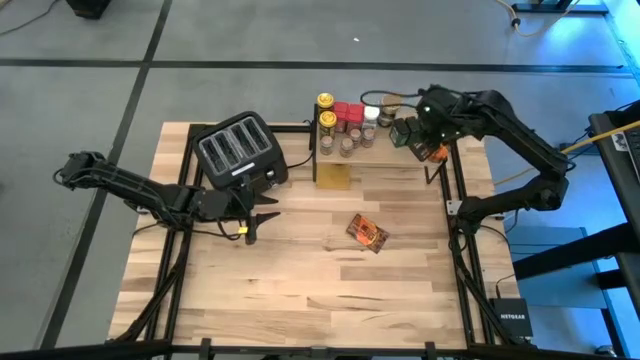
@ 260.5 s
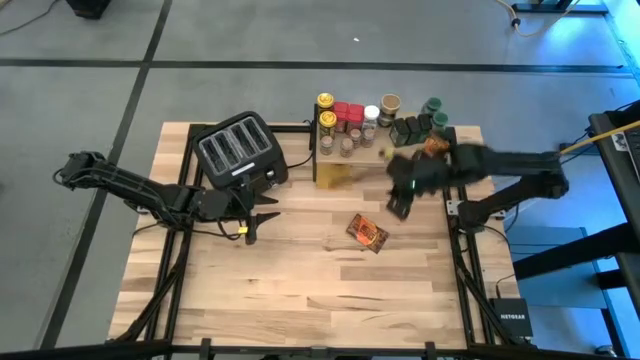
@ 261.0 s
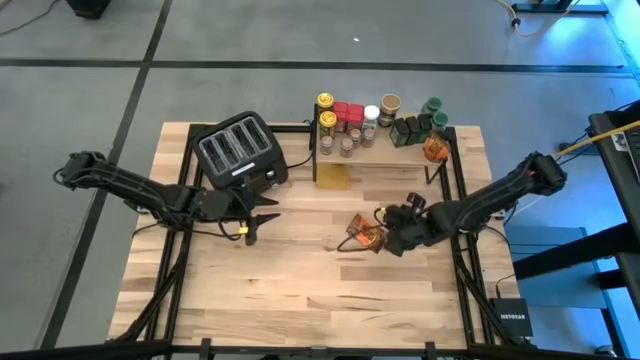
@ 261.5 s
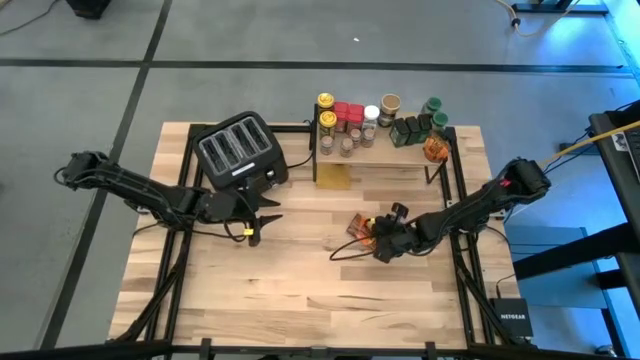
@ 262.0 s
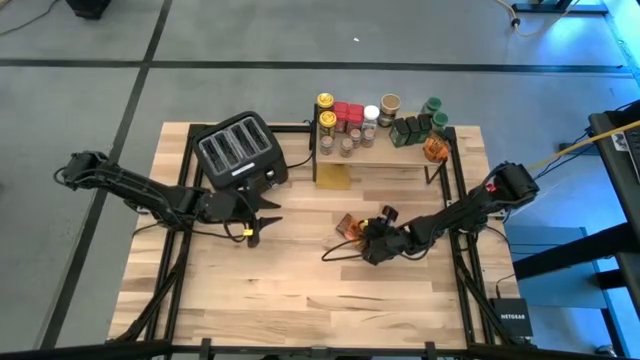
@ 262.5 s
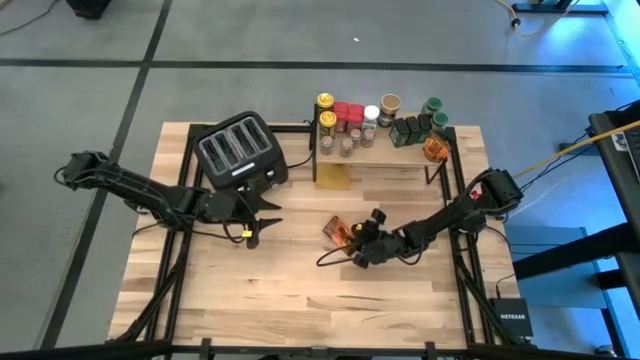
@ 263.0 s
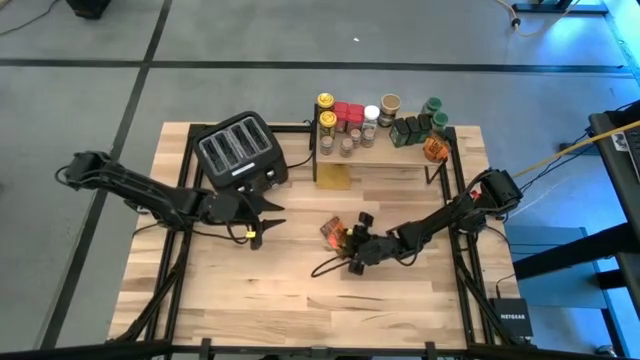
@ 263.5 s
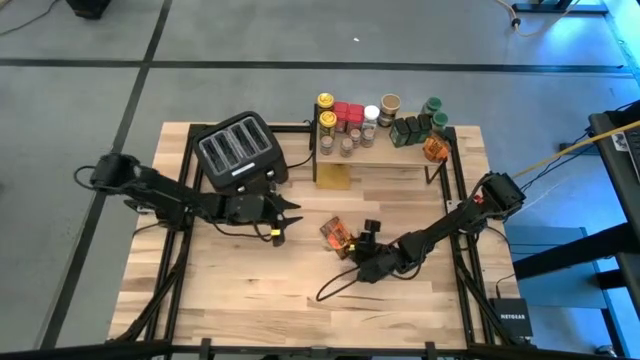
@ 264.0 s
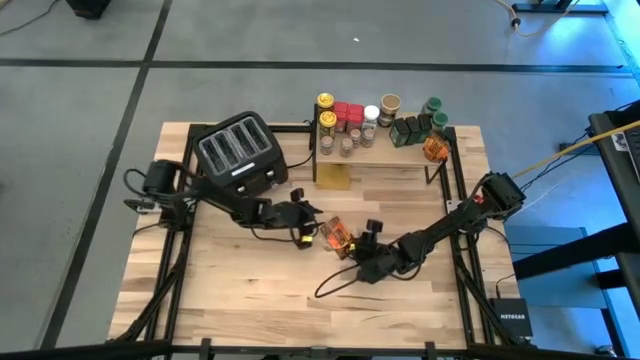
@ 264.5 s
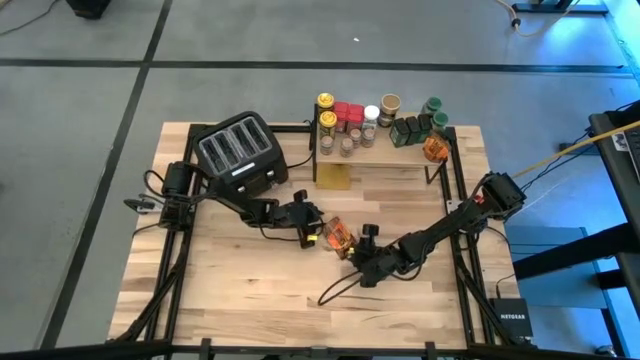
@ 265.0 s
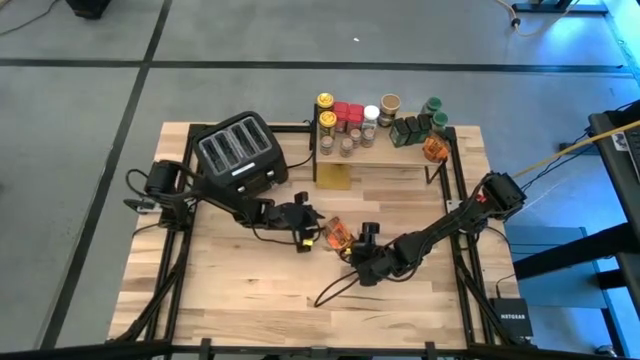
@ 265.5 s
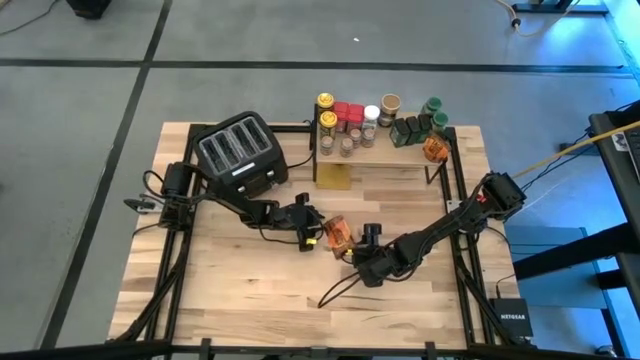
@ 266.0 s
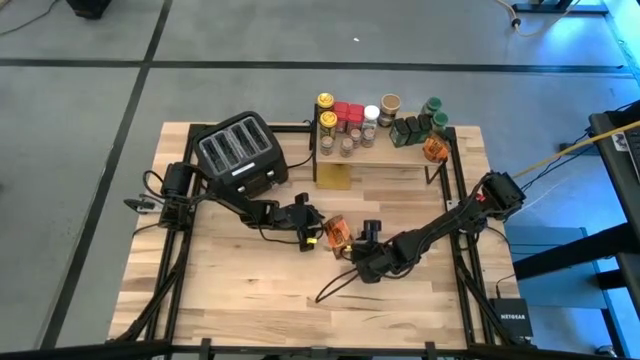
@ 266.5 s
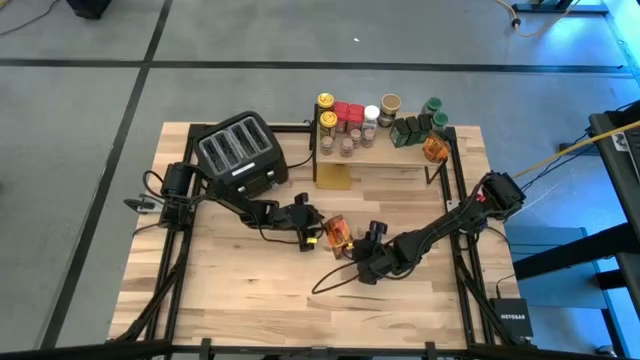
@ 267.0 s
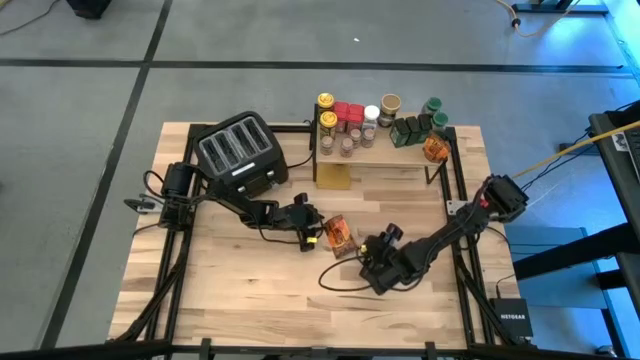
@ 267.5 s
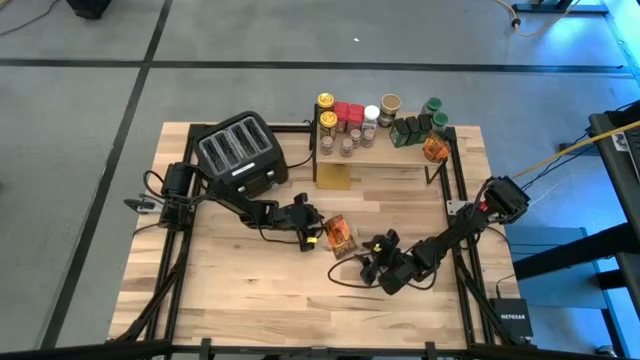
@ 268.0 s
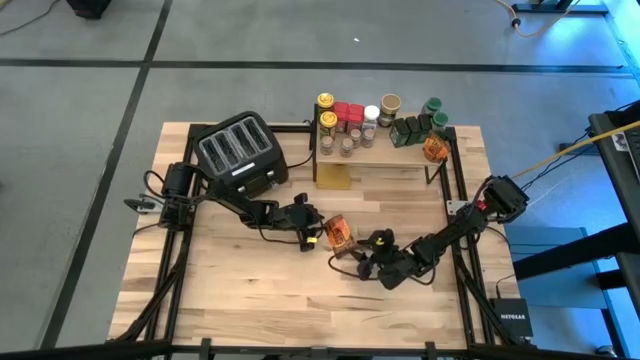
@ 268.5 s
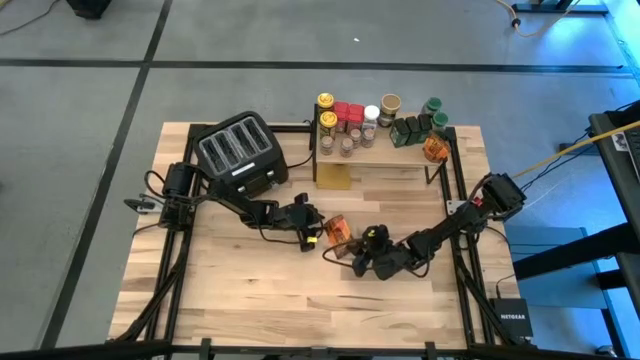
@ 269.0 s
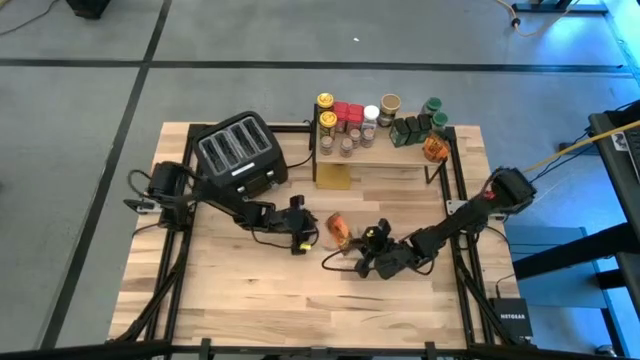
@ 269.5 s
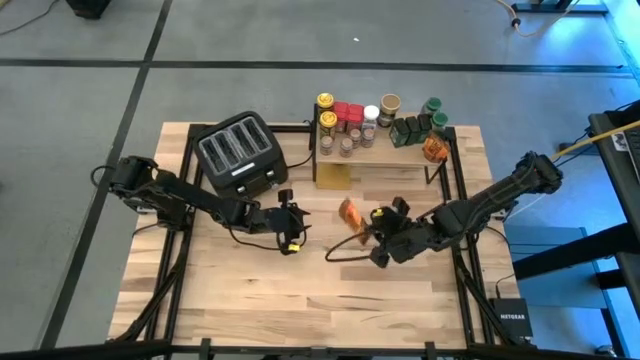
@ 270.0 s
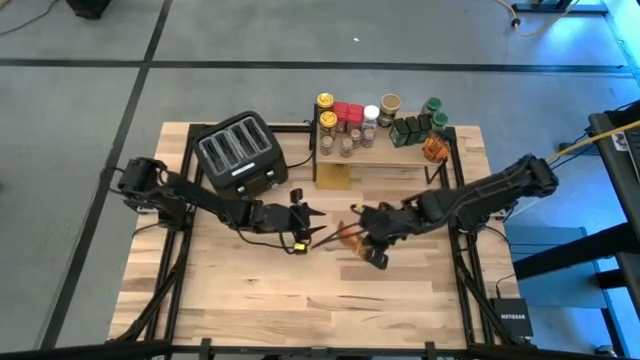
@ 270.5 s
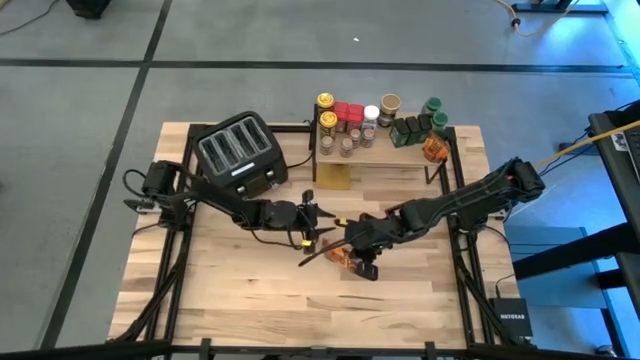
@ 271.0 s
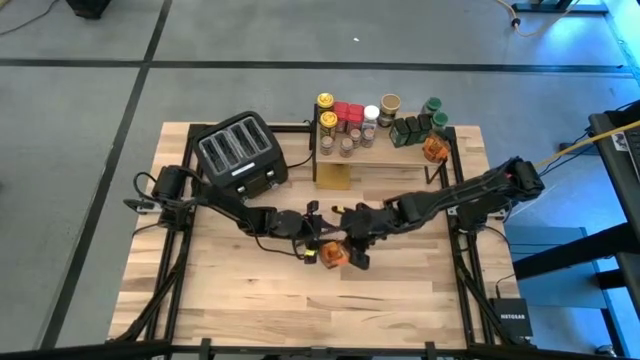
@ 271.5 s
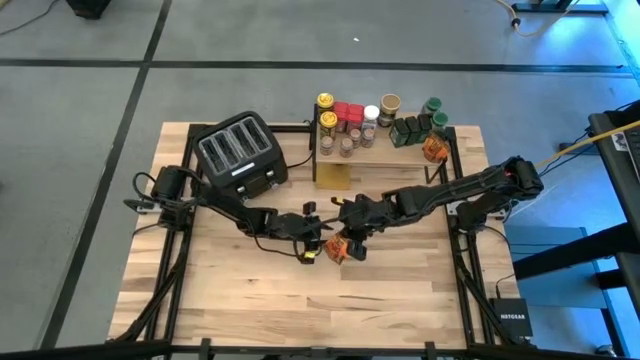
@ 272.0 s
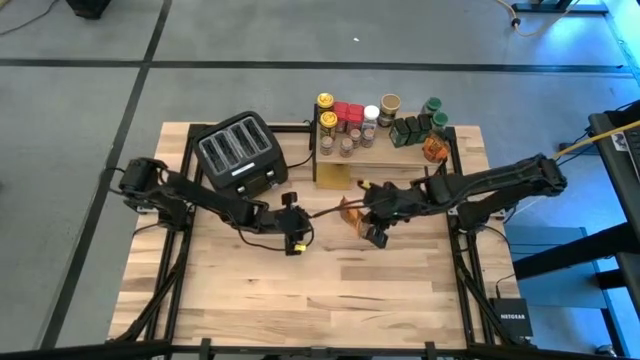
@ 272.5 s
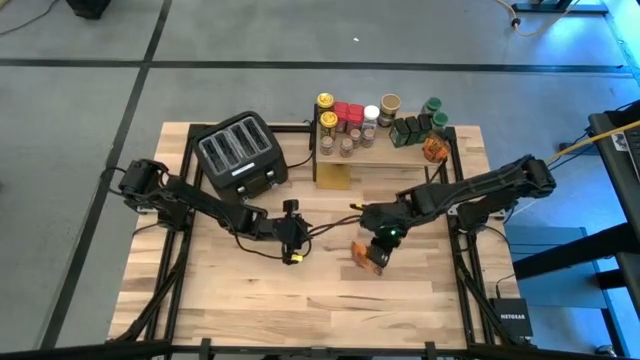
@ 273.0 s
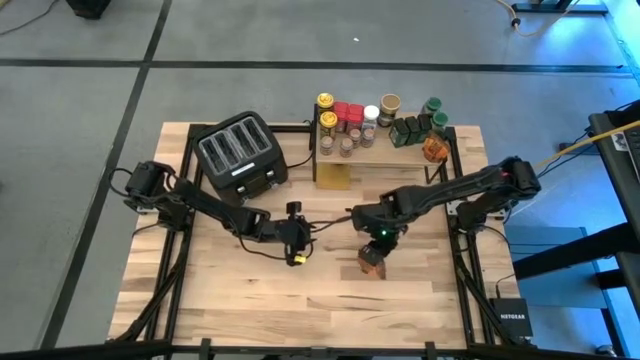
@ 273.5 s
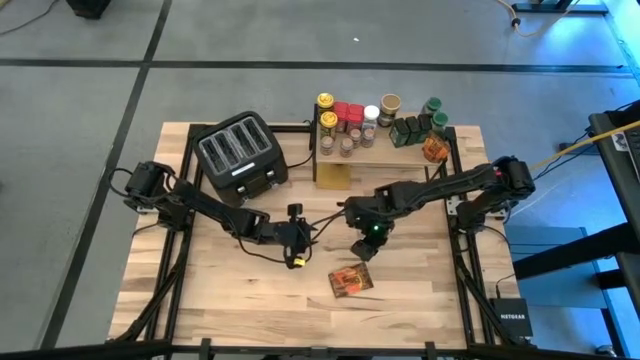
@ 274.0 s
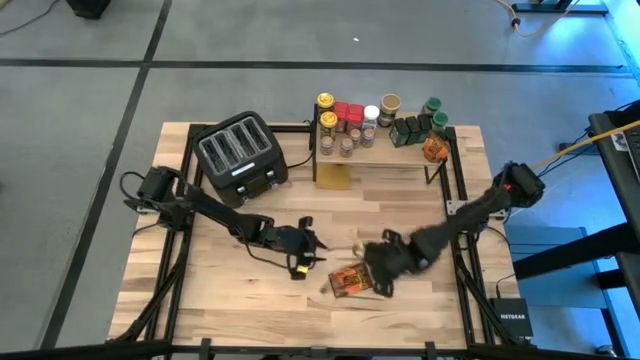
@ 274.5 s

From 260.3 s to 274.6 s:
Task: Shelf spices
Put the orange seasoning pack on the shelf

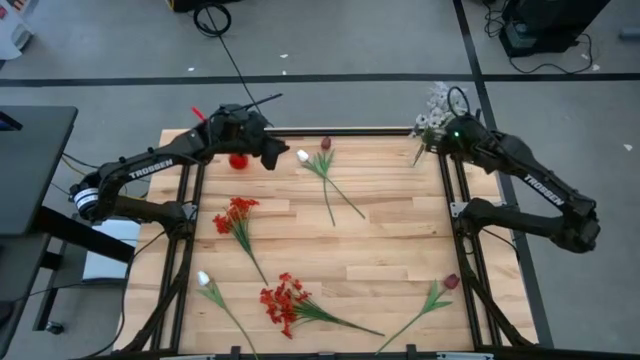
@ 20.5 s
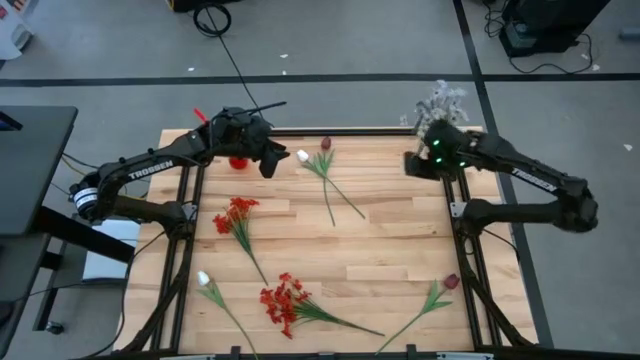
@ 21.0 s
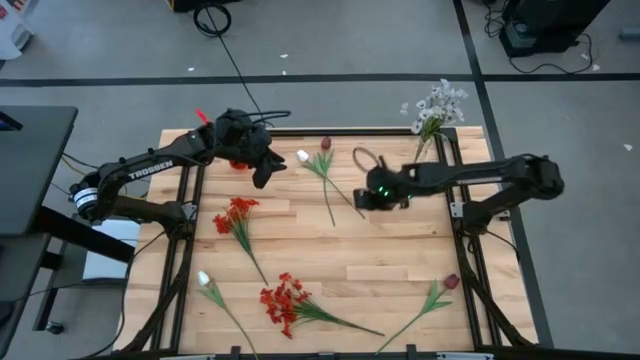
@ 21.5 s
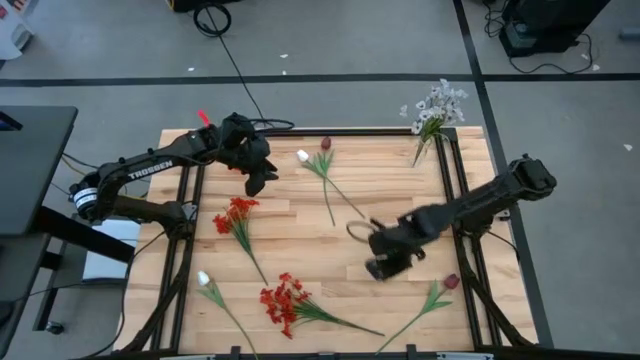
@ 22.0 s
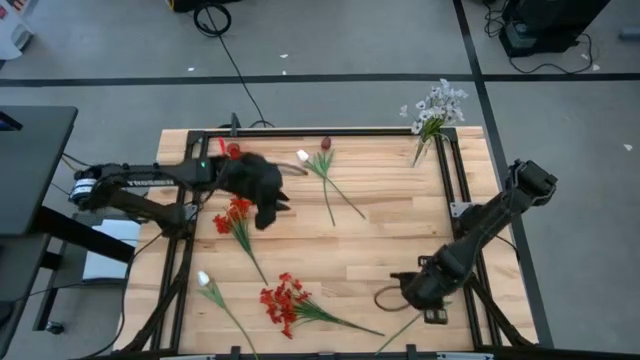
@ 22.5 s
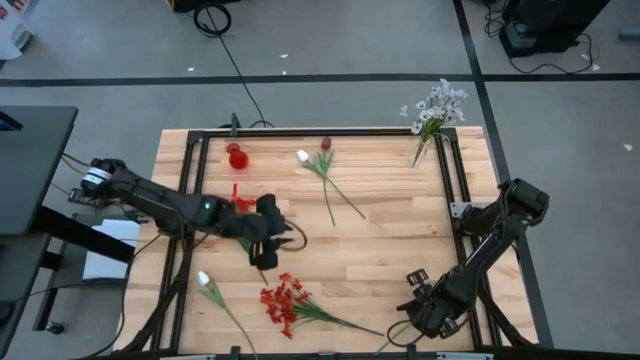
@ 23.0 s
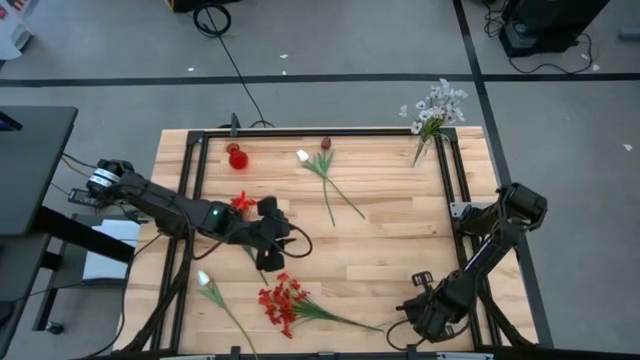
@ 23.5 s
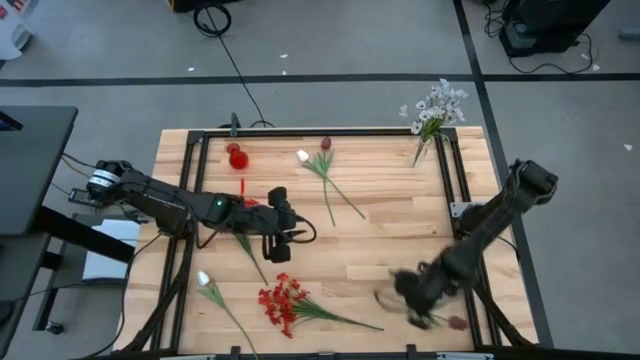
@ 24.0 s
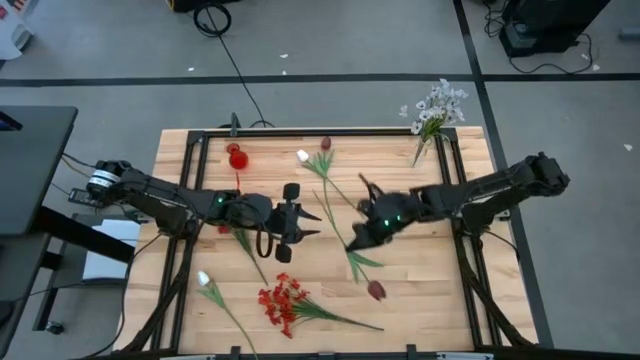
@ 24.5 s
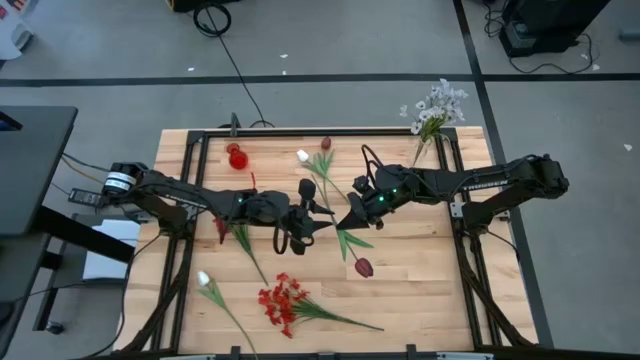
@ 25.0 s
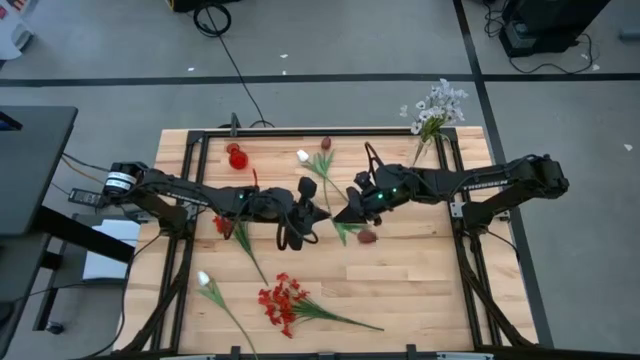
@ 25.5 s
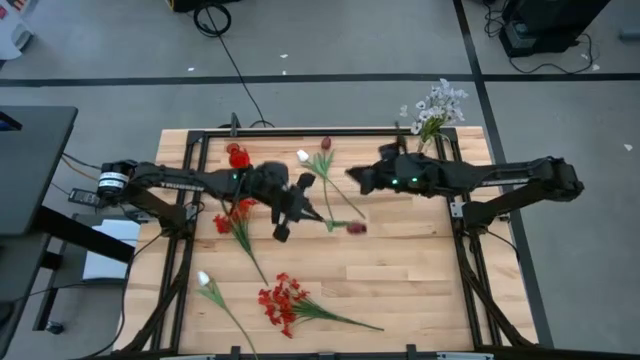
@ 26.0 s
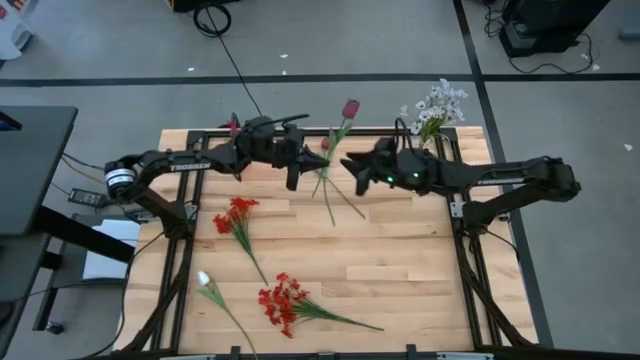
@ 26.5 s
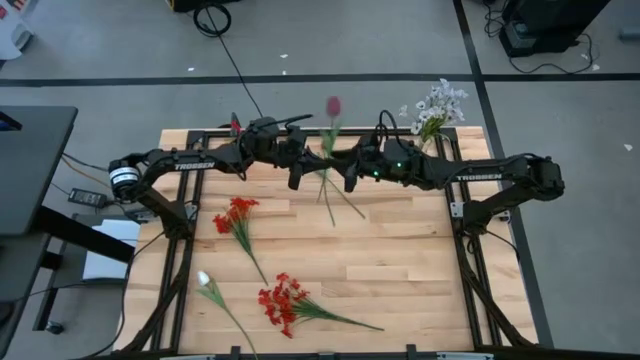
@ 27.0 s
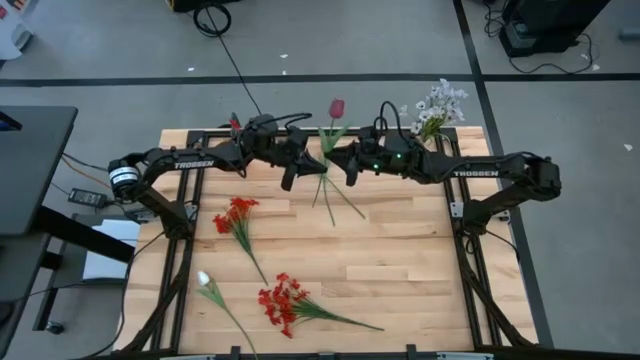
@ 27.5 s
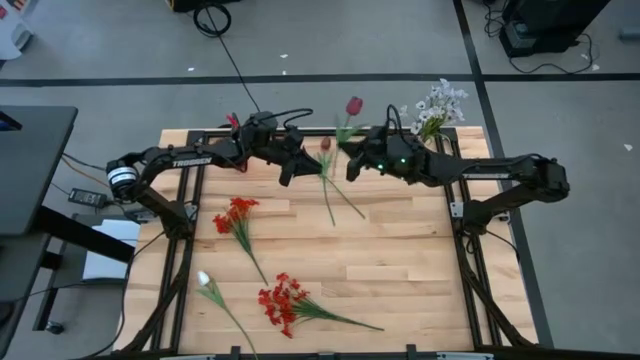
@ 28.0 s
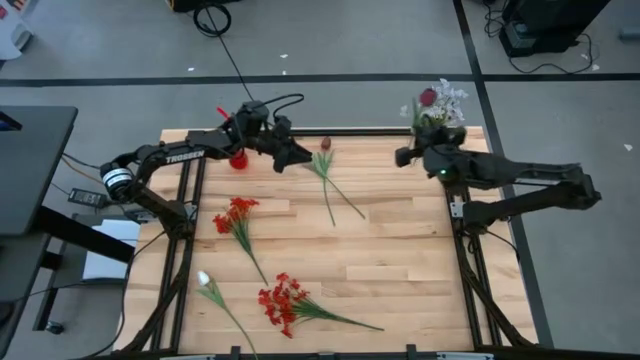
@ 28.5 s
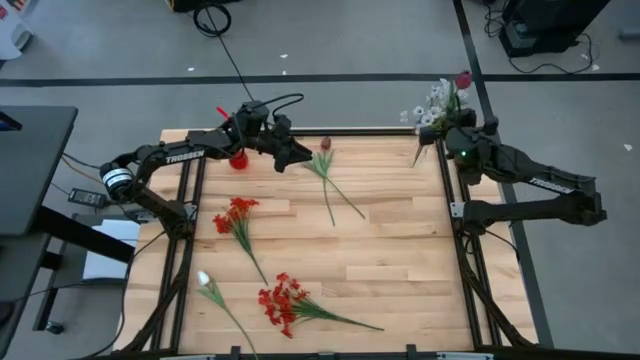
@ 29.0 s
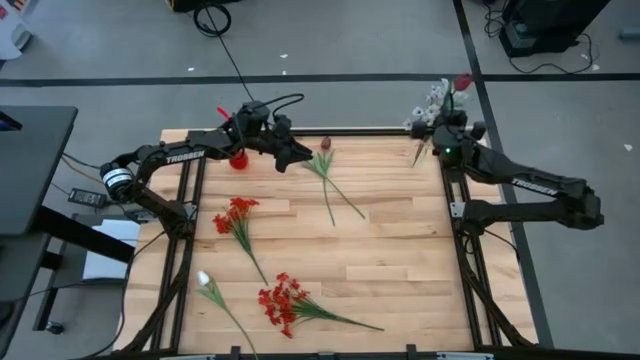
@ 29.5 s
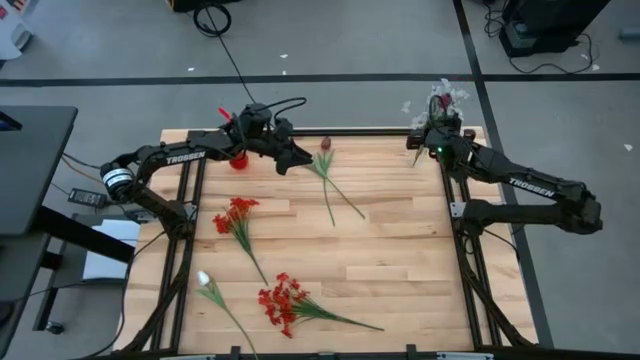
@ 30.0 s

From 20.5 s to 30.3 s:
Task: Sort flowers into vase by color
Put the bottom dark red flower into the transparent vase
